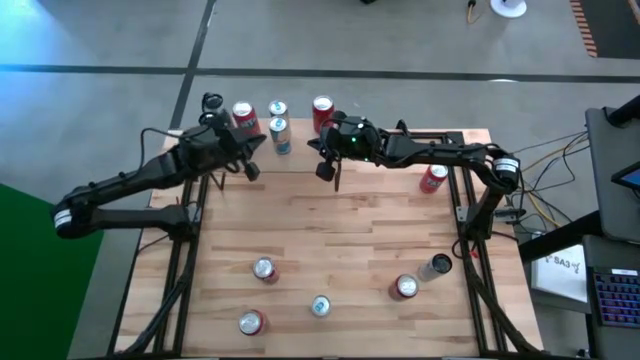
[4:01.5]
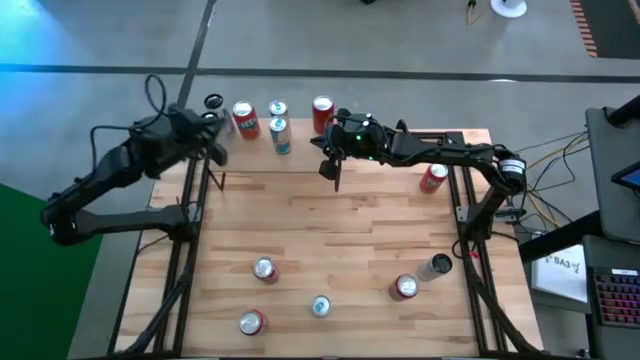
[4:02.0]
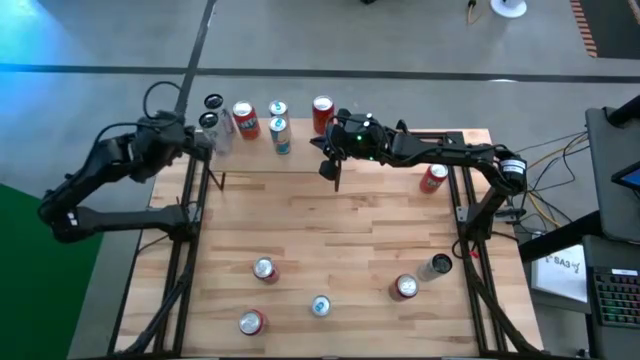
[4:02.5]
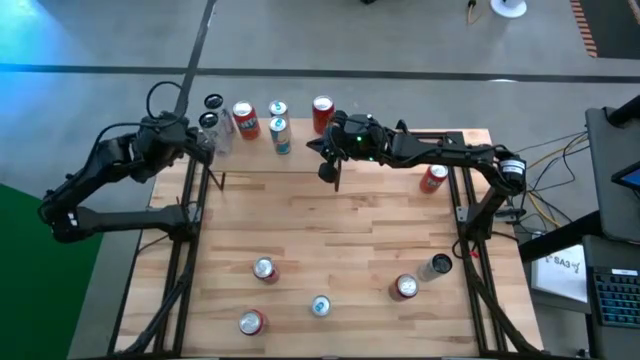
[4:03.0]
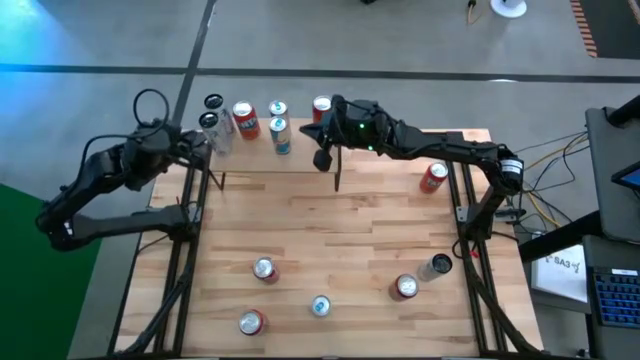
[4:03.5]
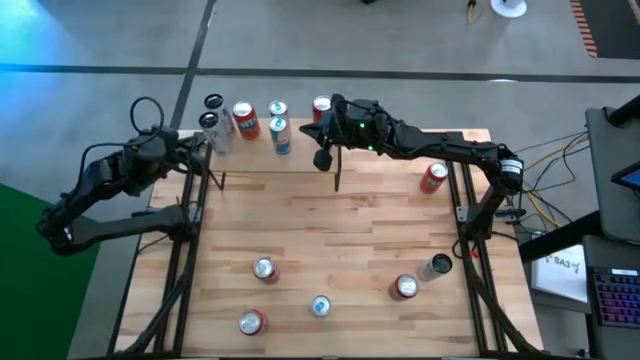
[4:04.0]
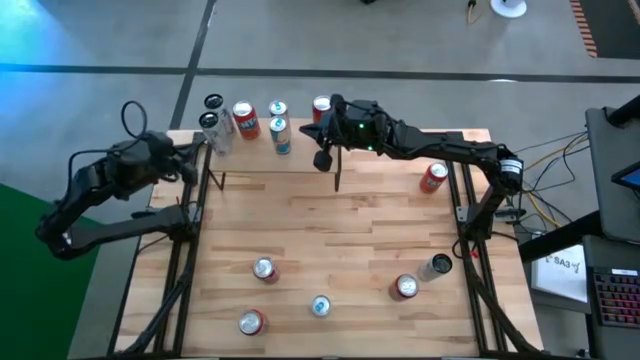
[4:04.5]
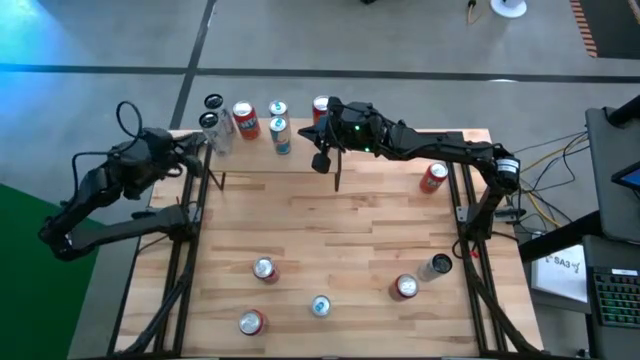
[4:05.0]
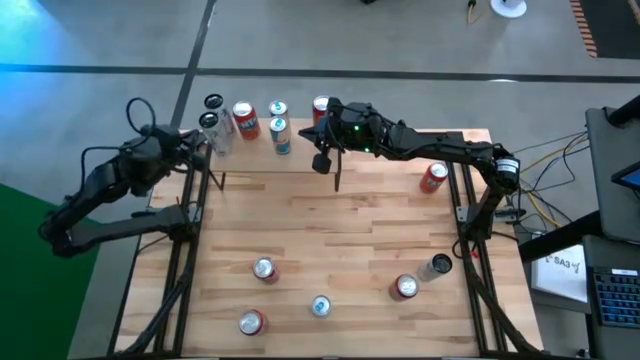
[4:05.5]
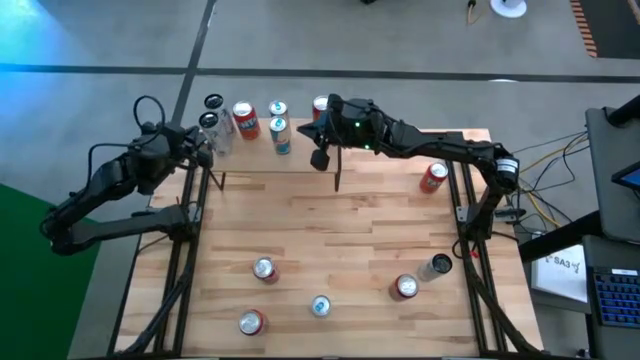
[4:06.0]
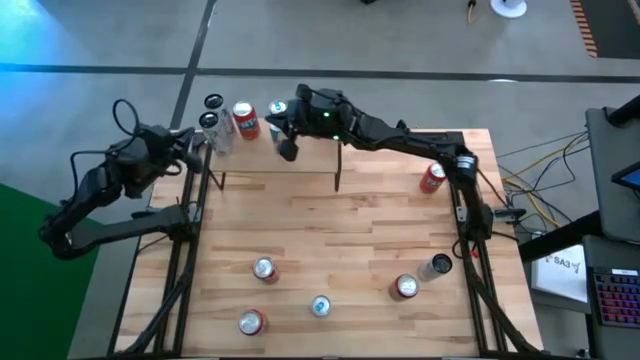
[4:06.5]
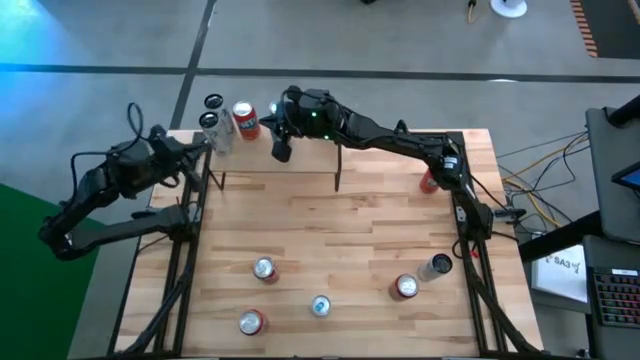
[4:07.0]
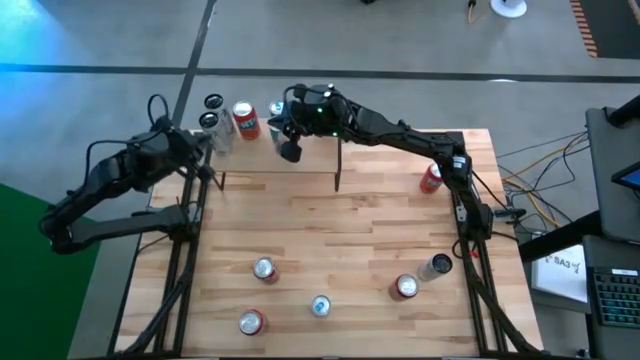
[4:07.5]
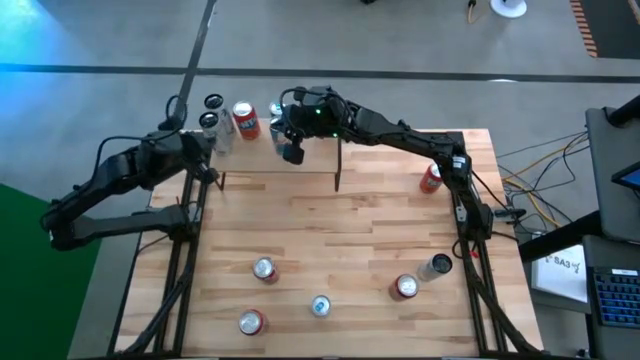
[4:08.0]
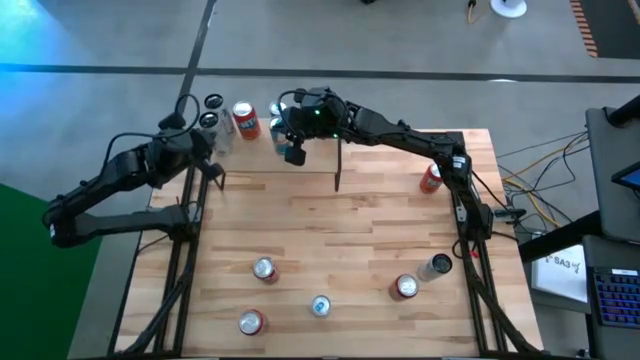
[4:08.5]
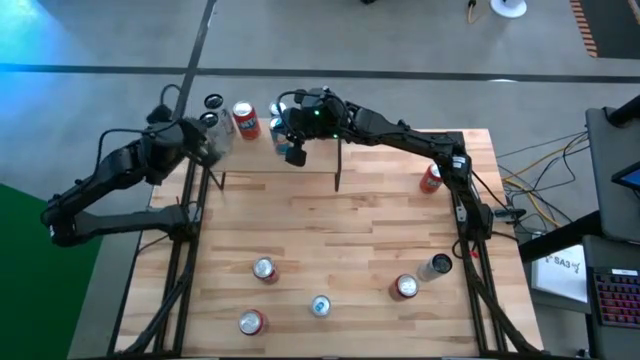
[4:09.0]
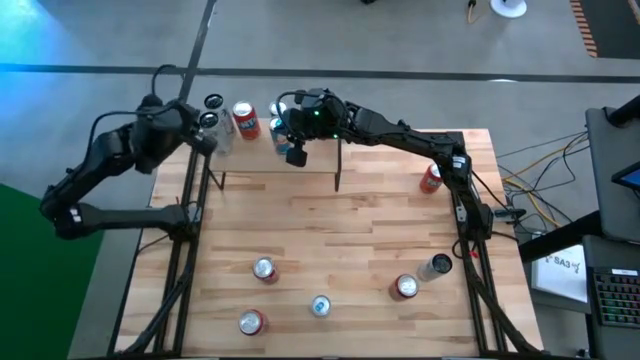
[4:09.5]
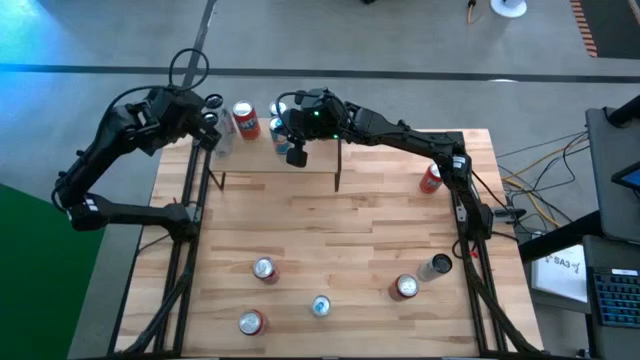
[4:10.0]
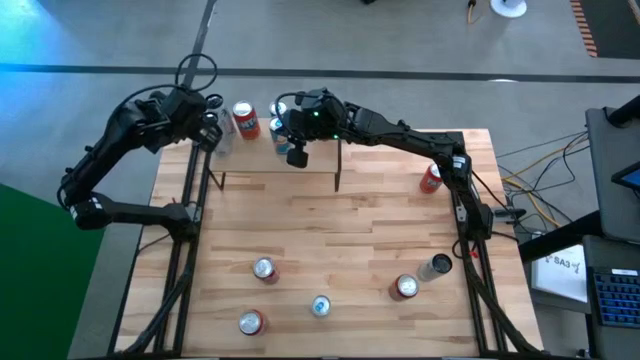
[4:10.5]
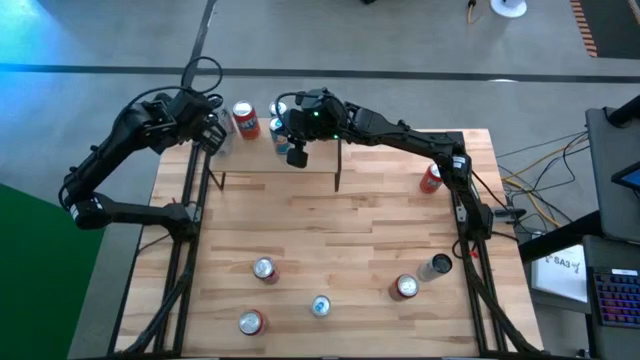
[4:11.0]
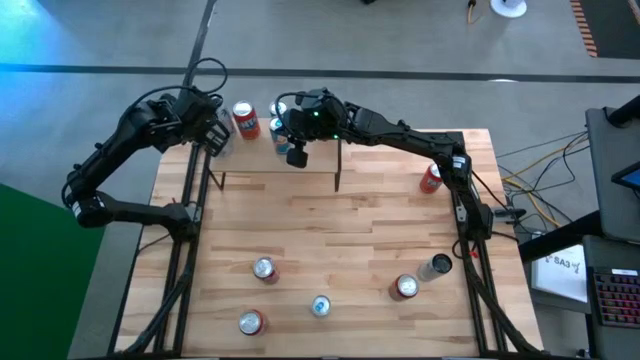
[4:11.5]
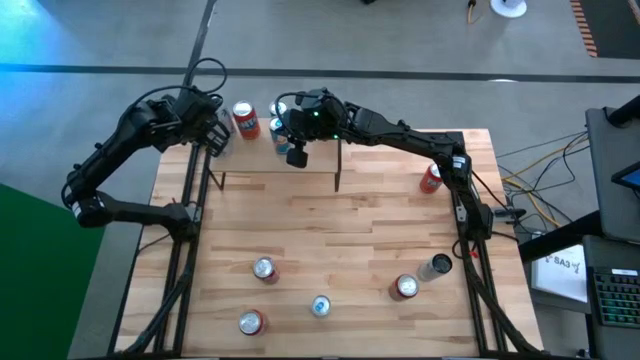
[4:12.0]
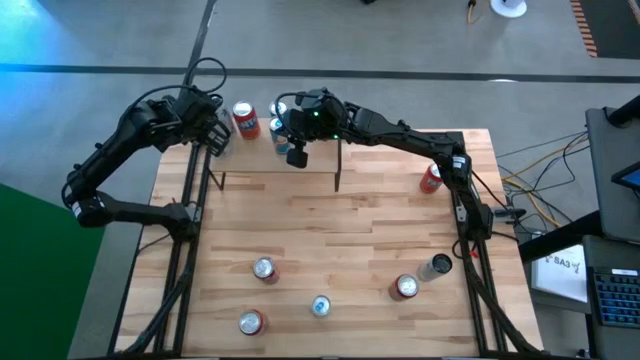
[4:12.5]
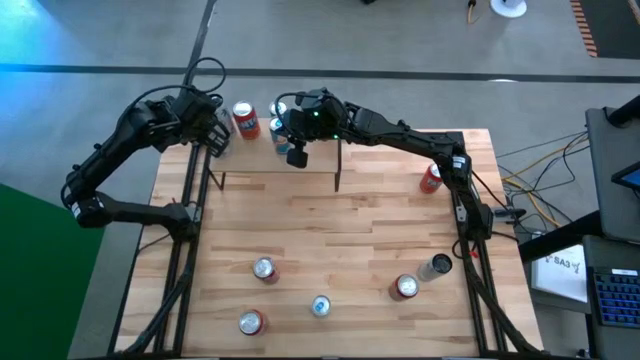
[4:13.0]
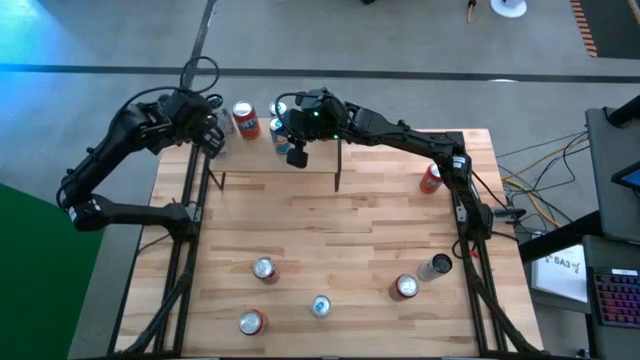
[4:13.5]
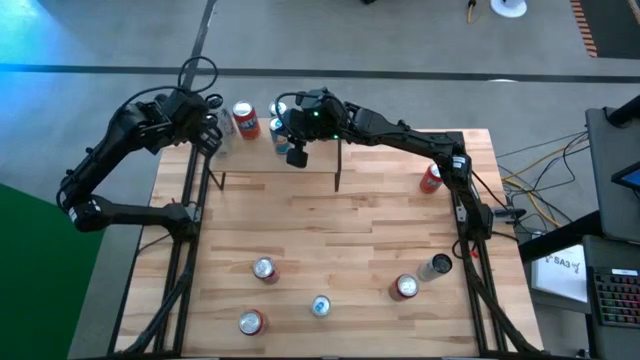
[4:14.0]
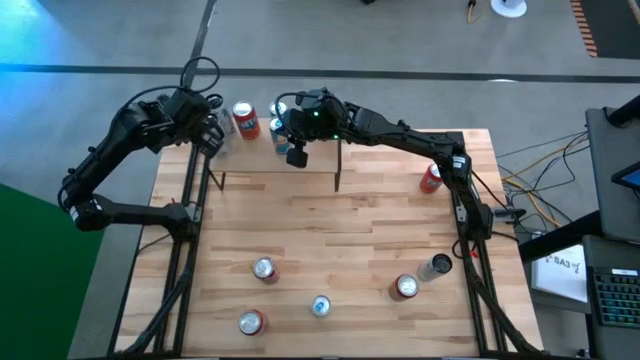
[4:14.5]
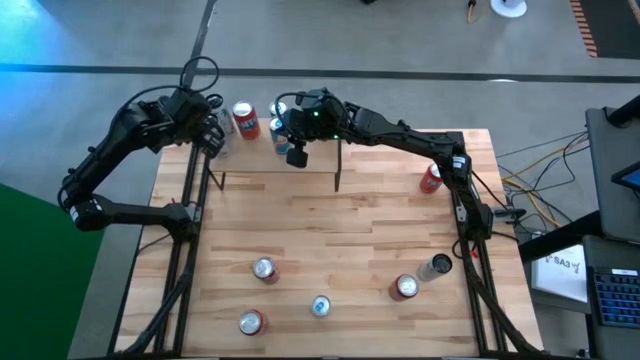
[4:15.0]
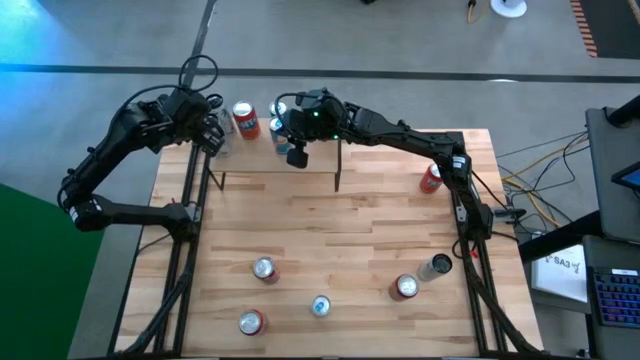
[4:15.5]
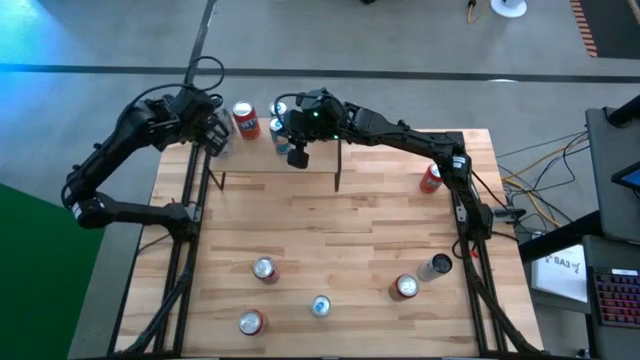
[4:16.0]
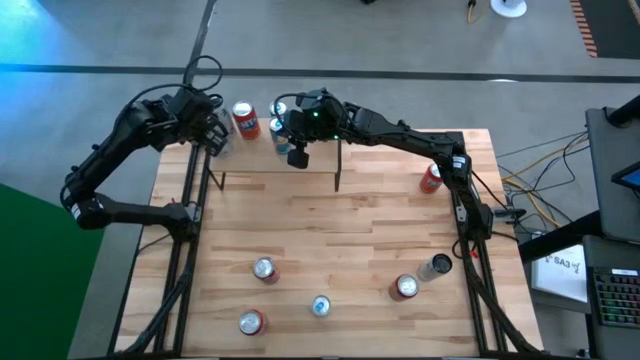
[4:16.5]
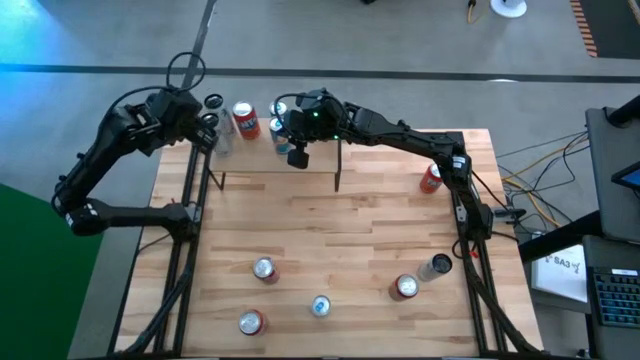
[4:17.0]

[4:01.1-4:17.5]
Task: Place canned beverage on shelf
Adjust the white pink soda can on the shelf

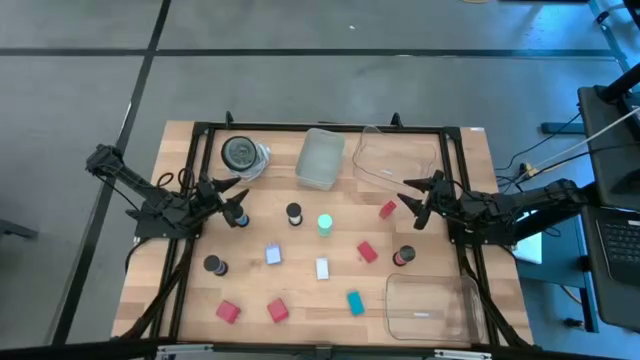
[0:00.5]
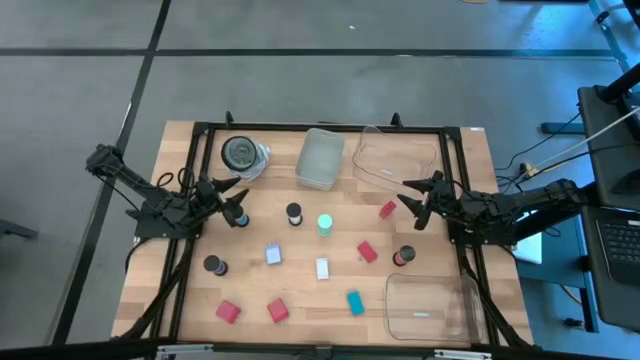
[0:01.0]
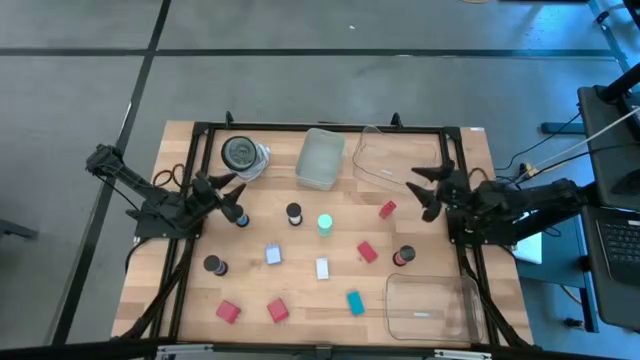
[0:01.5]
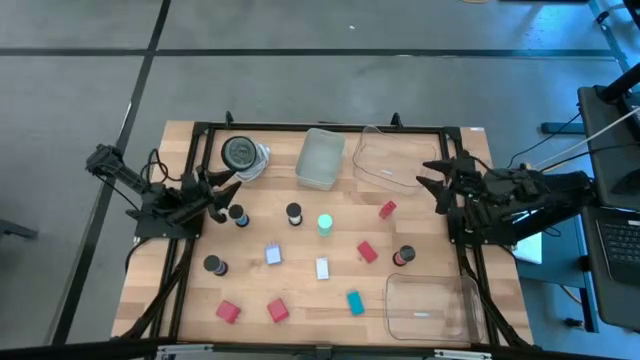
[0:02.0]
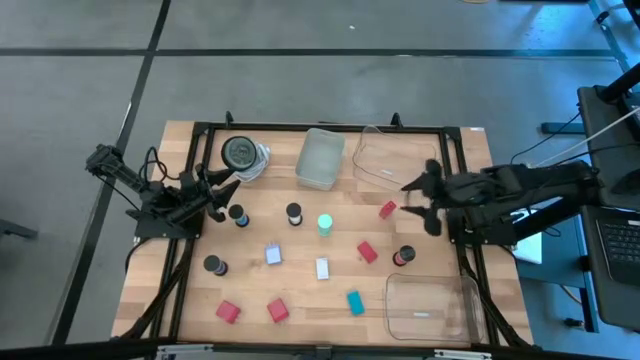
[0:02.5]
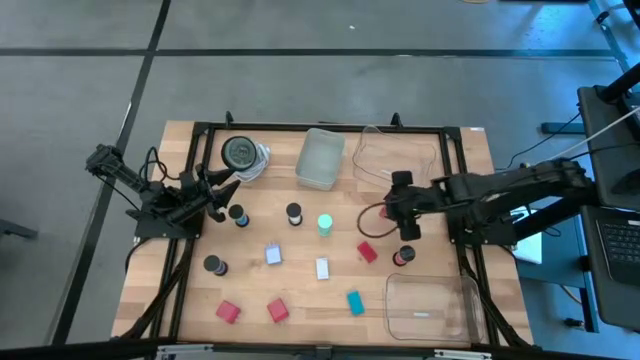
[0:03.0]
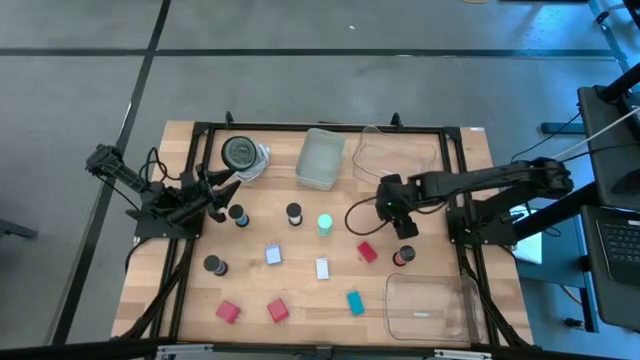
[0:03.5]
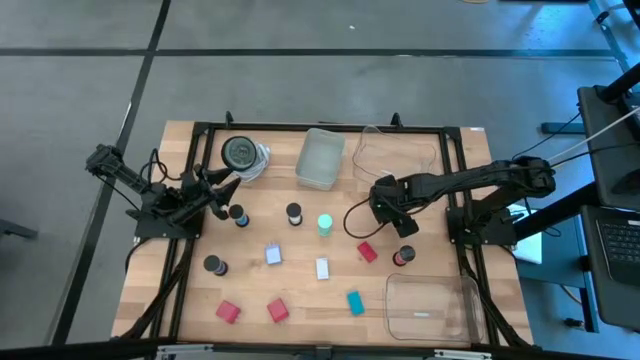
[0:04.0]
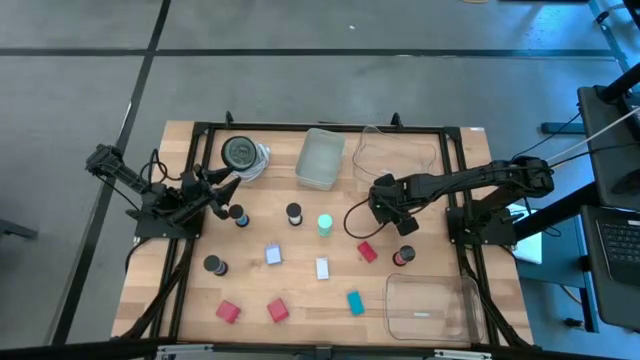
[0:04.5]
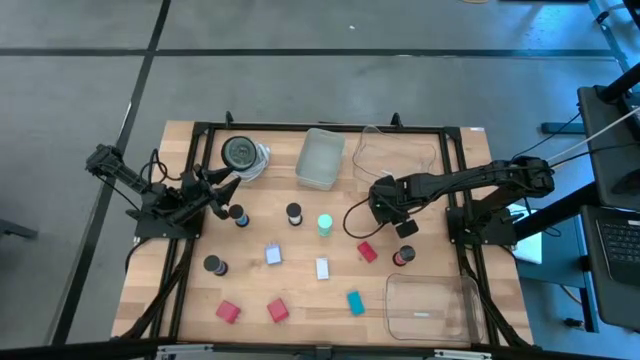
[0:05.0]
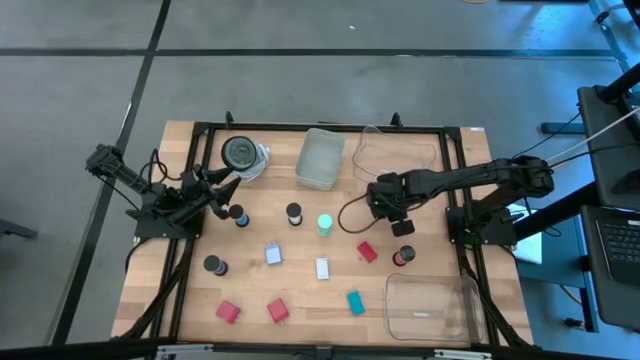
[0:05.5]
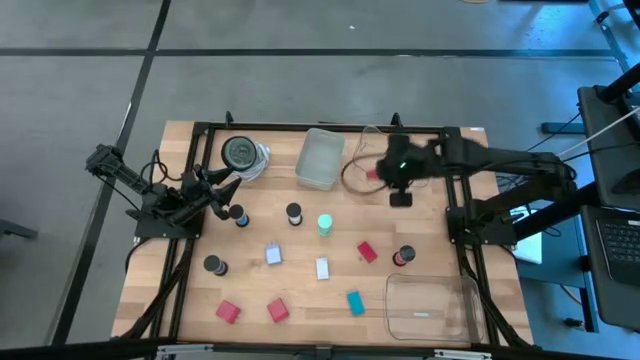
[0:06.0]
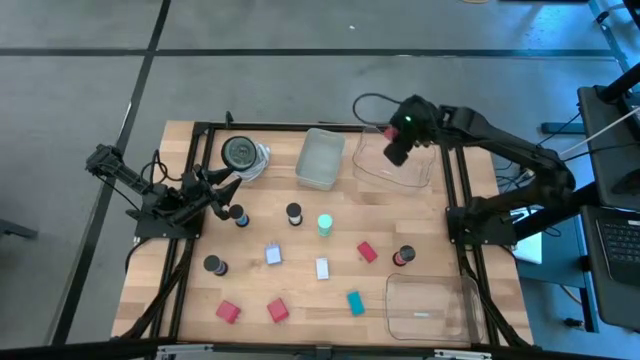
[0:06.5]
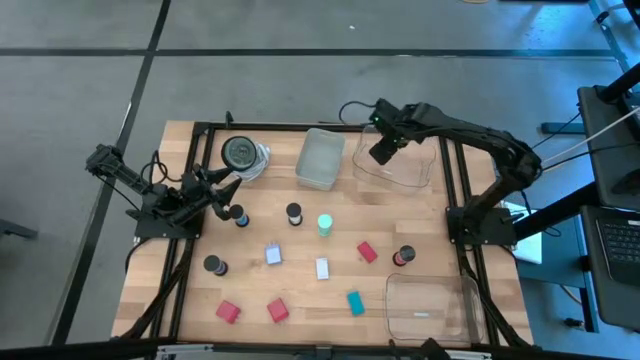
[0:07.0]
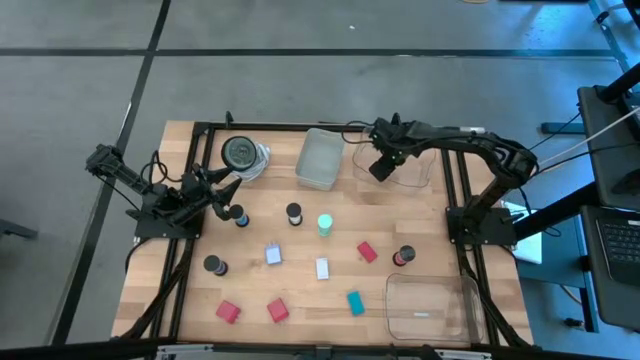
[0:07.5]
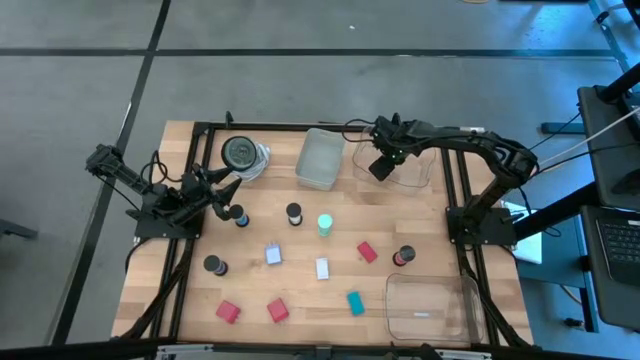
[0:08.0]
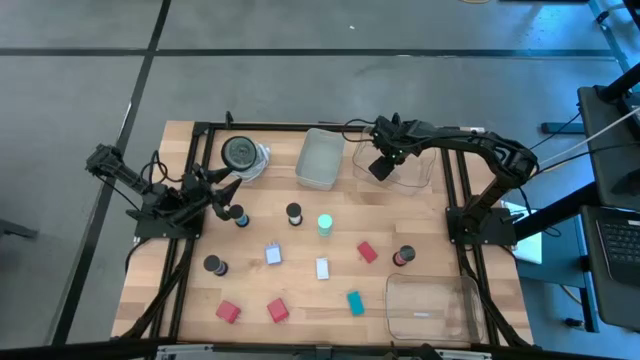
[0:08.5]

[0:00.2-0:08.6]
Task: Pick & Place Office items
Put the top right red charger adapter into the top transparent bin
